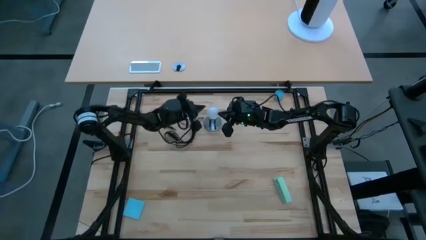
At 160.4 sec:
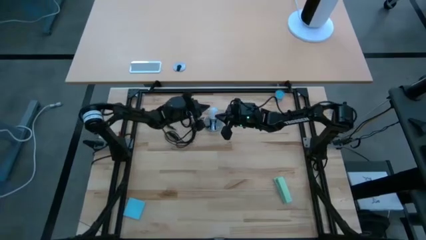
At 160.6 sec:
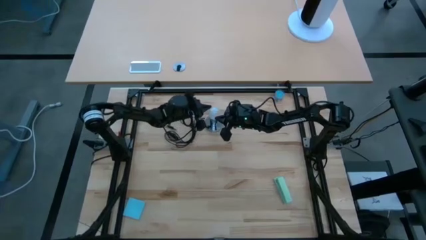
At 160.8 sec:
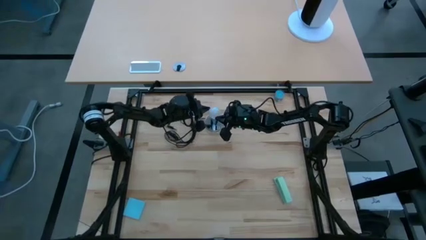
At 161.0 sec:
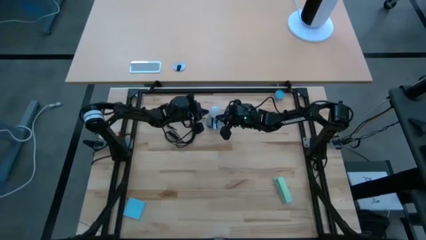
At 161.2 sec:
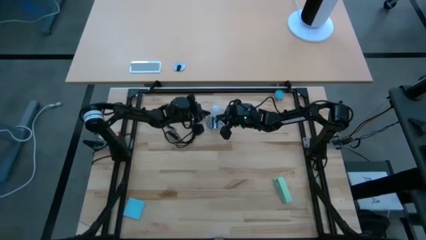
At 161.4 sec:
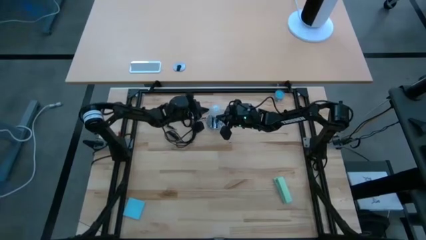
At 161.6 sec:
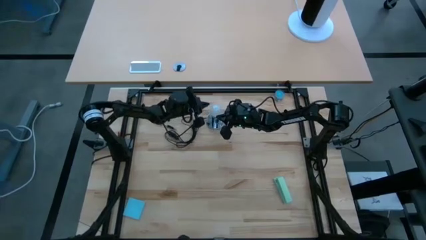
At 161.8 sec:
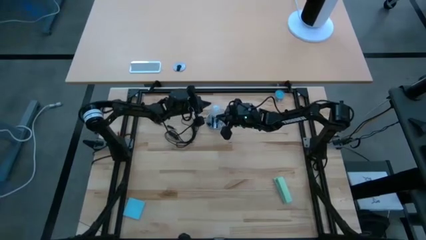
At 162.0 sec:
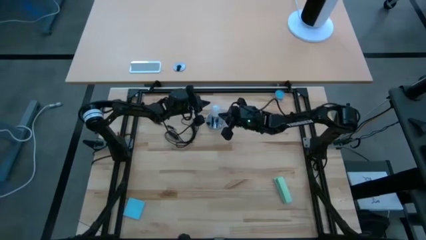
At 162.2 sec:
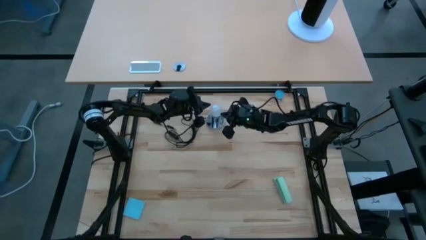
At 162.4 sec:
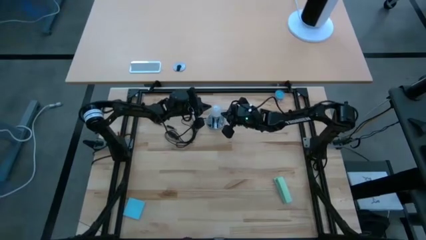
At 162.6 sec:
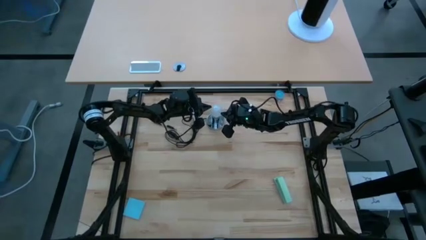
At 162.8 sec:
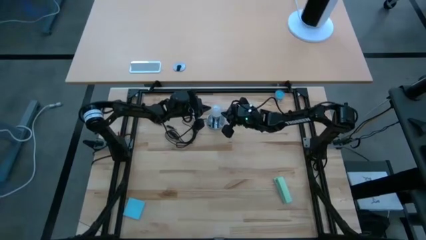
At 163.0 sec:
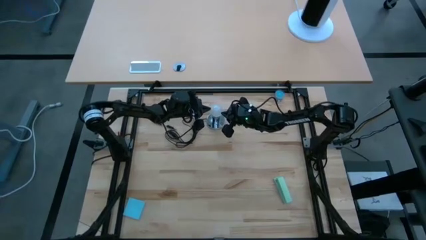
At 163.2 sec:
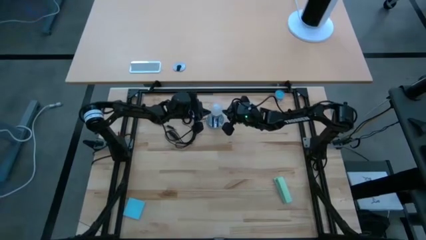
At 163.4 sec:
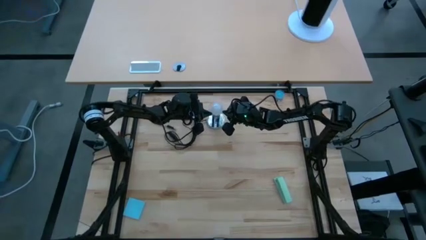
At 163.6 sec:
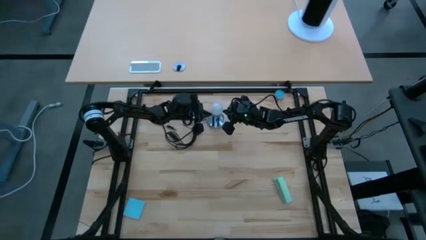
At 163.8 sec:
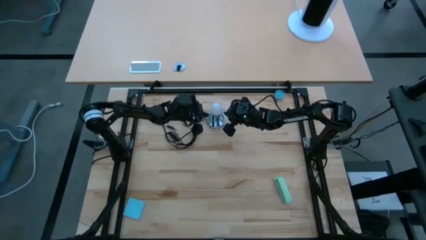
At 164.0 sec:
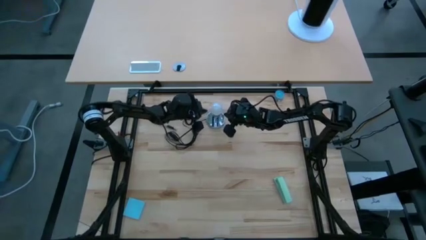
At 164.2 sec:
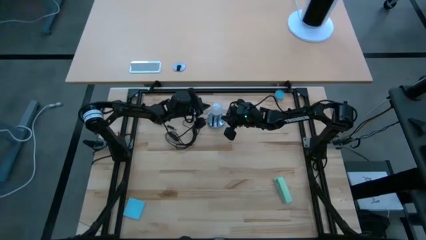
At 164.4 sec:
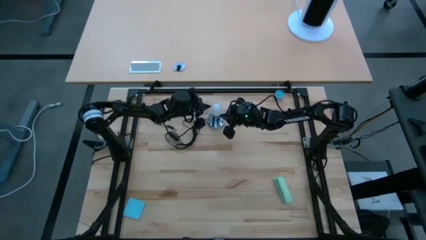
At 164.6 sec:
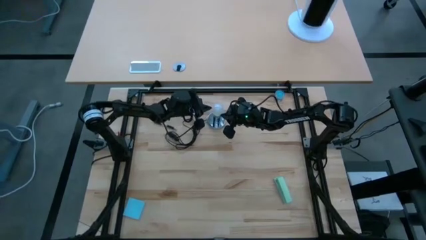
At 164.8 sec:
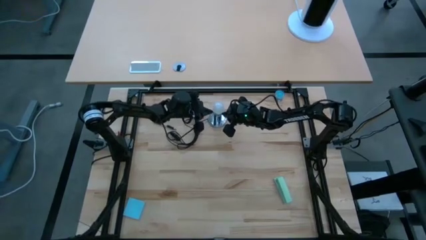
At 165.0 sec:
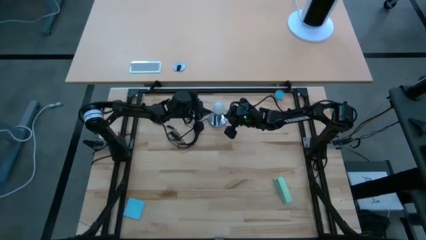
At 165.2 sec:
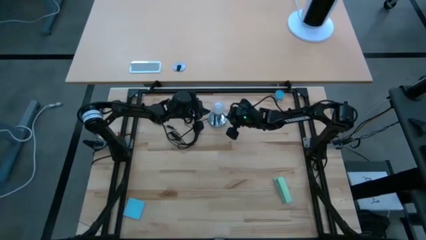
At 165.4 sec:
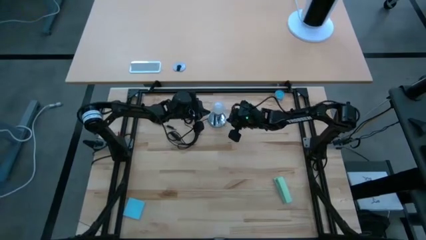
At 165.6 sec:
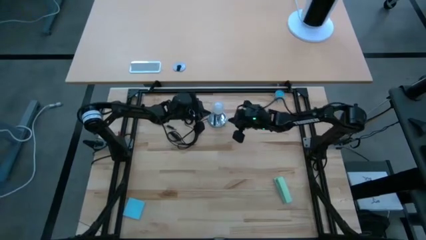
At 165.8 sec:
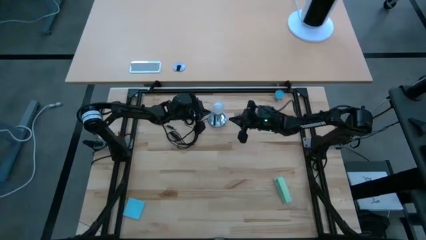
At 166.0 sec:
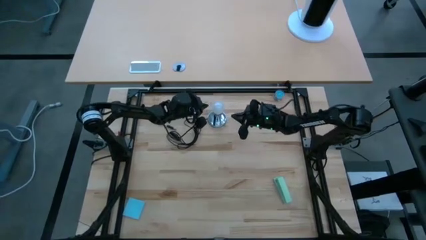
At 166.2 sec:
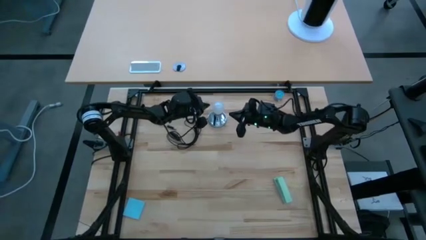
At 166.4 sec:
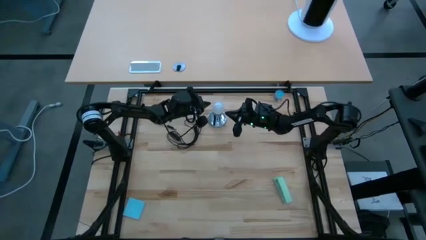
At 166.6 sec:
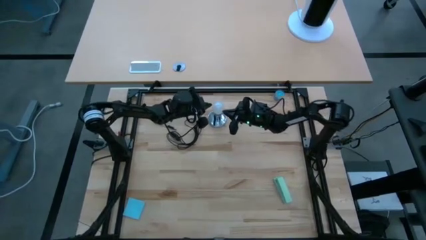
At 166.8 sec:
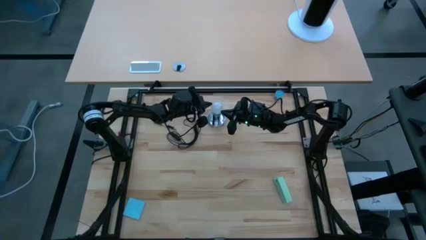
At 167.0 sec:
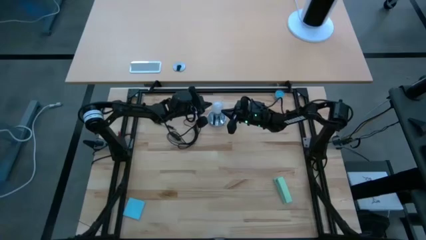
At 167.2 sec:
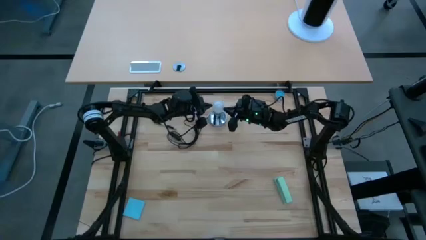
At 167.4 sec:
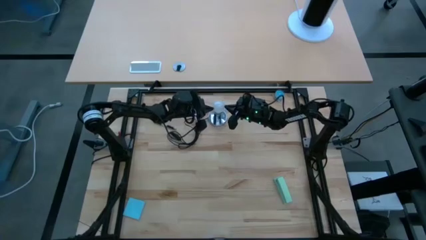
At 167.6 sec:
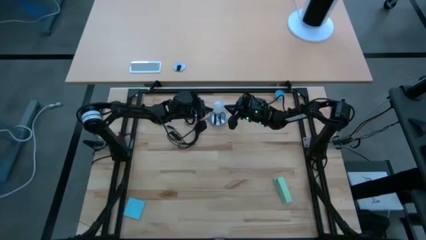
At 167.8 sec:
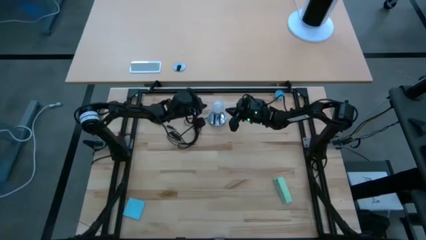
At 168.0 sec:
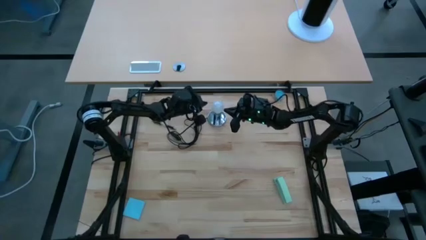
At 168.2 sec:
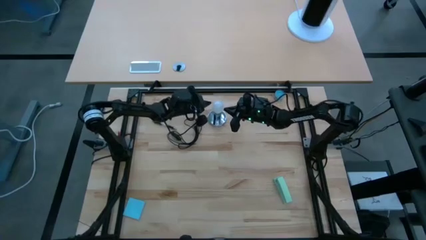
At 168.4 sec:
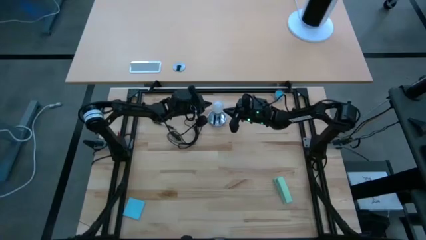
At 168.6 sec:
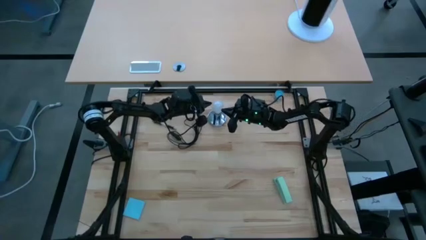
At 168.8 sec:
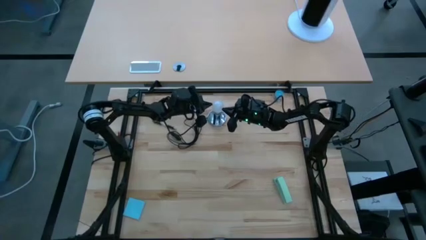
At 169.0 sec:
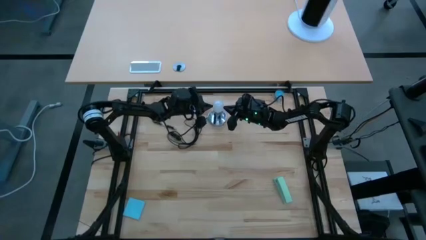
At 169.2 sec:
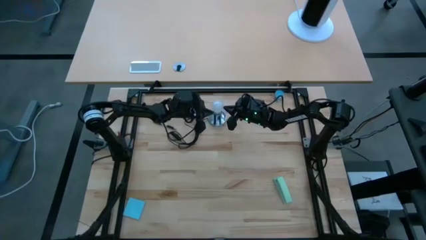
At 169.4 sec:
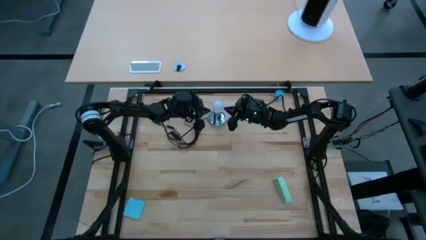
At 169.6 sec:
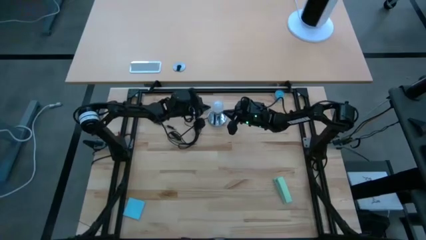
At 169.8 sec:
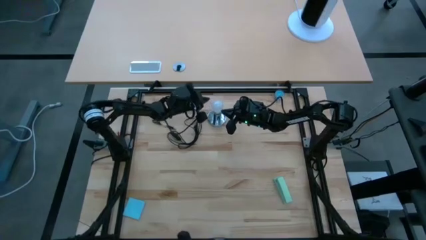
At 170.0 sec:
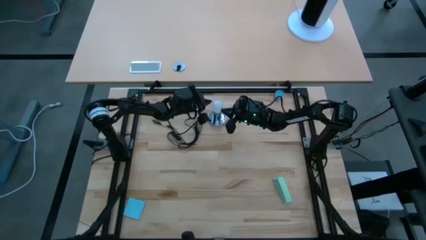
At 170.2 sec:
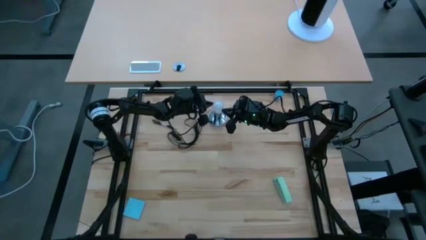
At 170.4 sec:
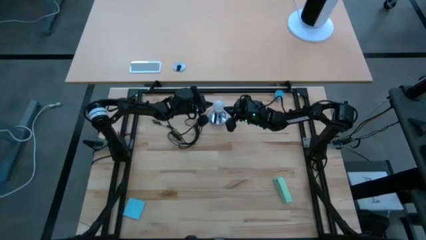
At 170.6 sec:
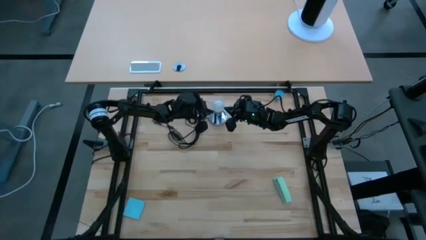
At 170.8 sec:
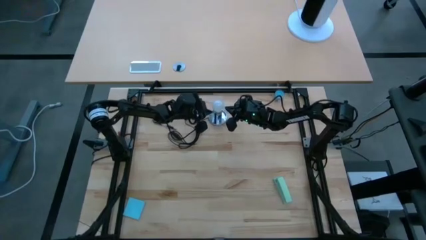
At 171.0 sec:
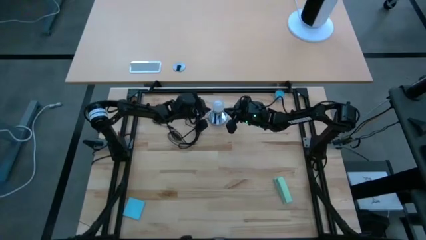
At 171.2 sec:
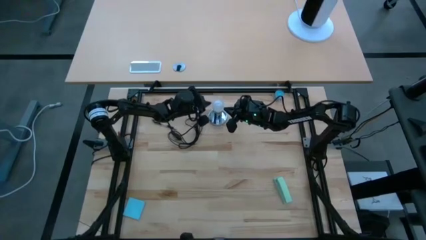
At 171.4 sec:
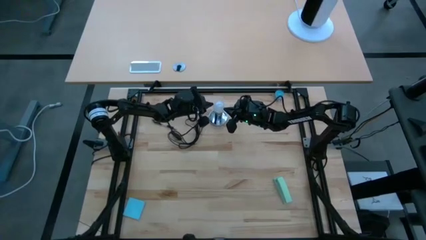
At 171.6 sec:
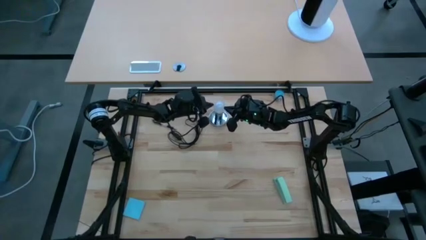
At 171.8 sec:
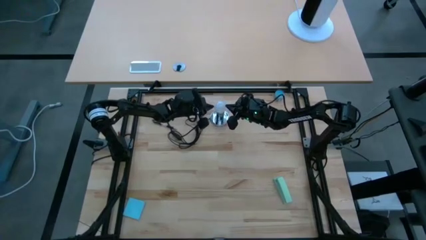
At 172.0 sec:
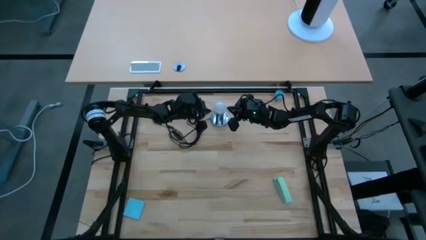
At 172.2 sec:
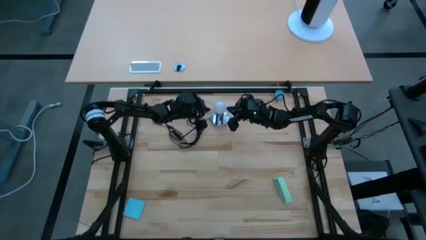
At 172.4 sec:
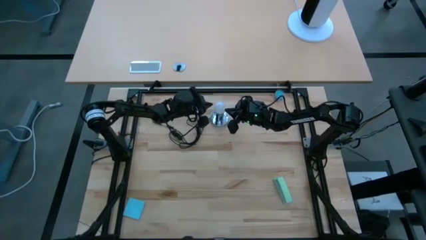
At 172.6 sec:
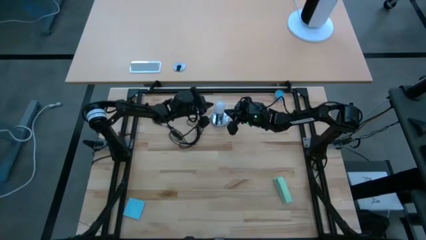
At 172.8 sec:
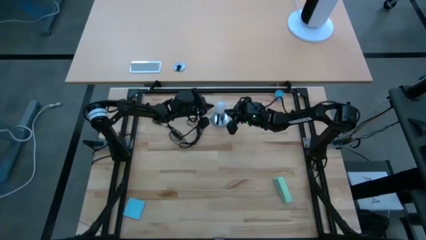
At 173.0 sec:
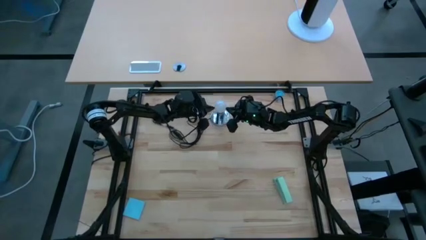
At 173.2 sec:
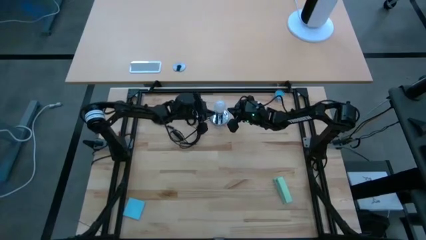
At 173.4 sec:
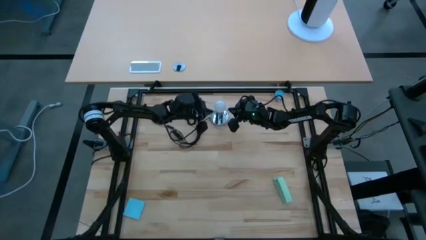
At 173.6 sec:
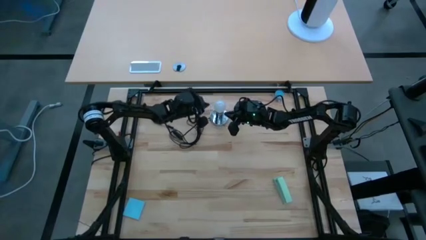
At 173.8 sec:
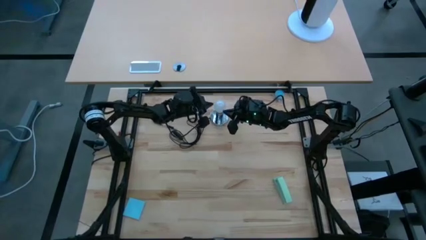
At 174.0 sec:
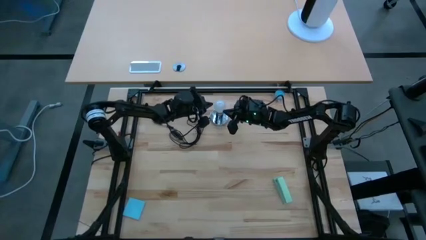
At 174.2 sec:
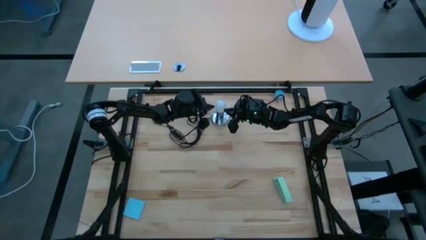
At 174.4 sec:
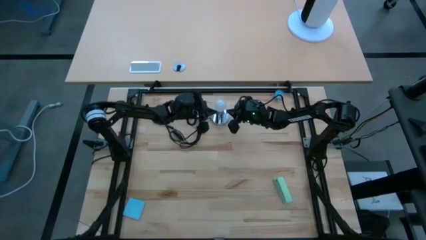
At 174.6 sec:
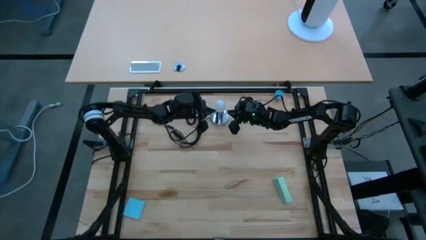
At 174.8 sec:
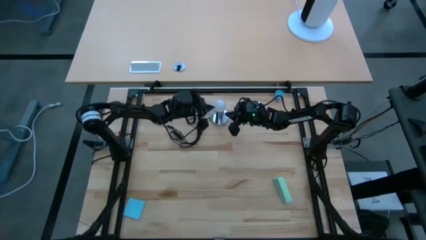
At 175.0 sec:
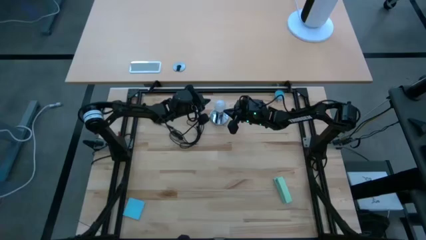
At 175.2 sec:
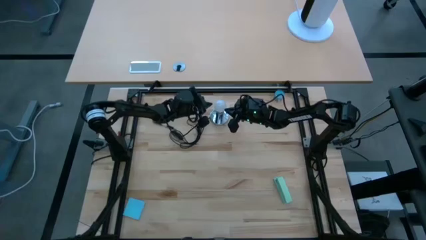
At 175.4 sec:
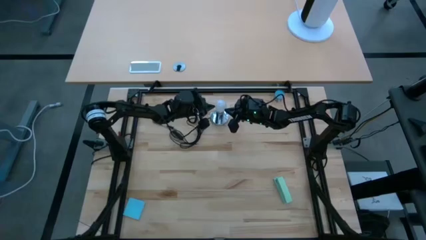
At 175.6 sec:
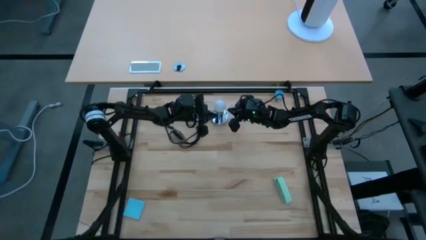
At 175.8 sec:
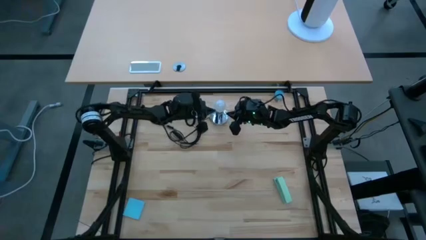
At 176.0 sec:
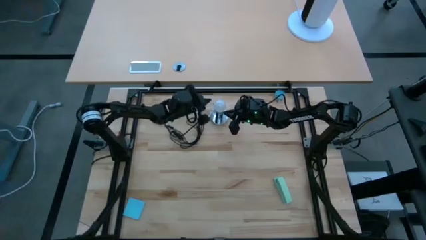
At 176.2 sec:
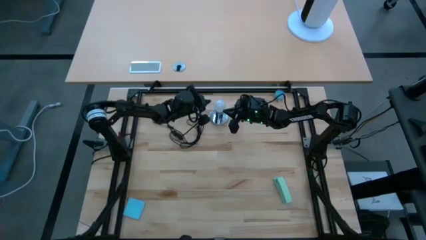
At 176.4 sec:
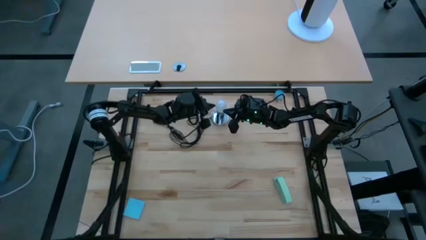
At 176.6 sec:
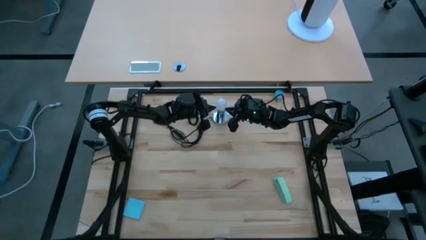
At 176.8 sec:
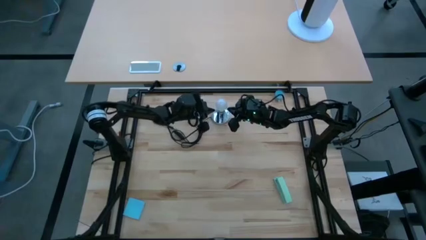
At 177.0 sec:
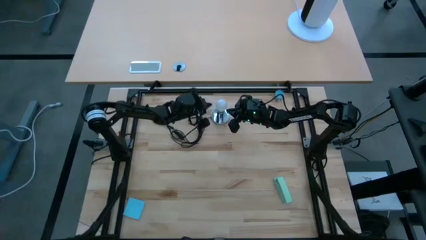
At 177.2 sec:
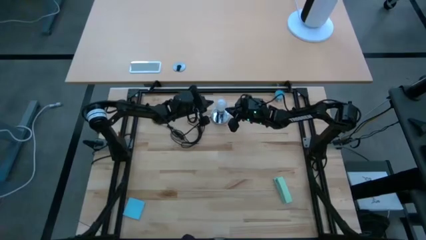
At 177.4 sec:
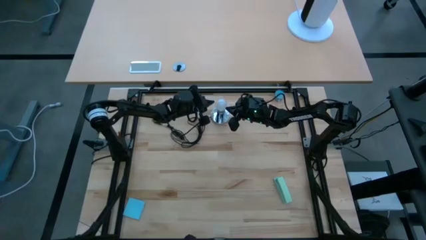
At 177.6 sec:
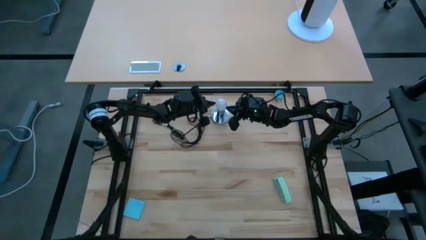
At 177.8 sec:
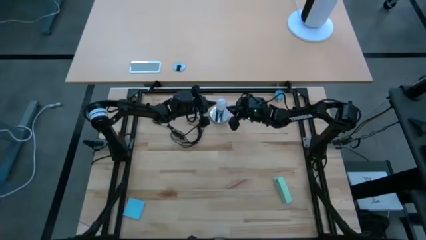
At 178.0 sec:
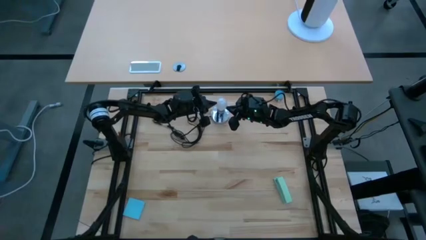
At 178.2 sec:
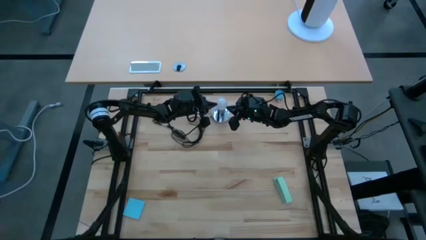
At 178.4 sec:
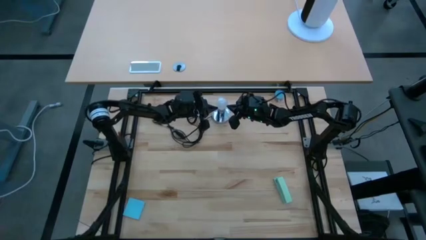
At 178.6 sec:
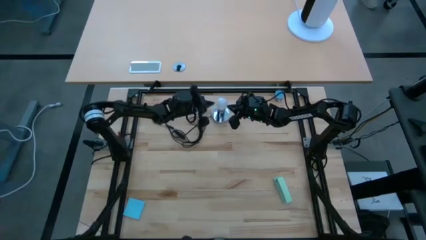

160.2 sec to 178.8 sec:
Task: Screw lightbulb
Remove the lightbulb from the lamp
